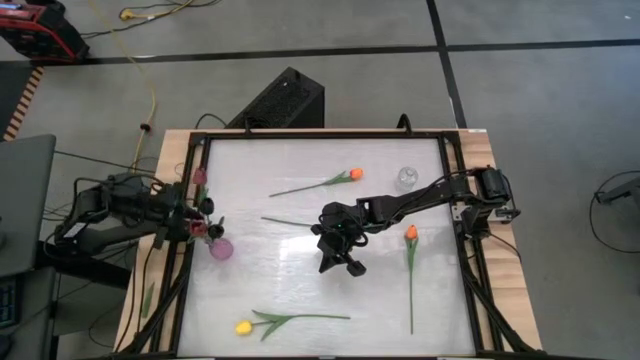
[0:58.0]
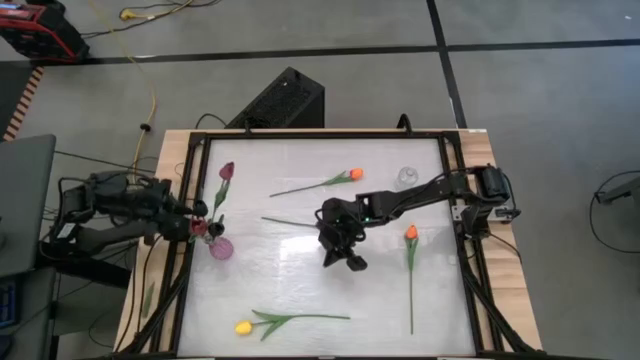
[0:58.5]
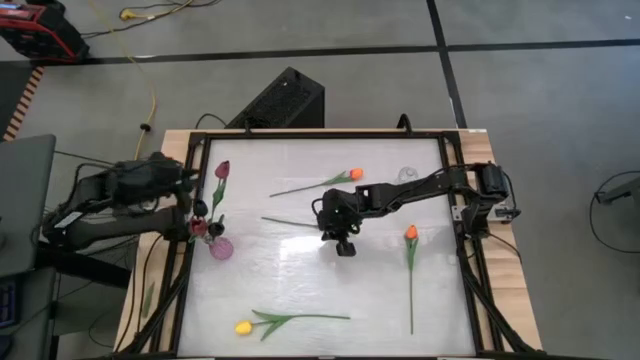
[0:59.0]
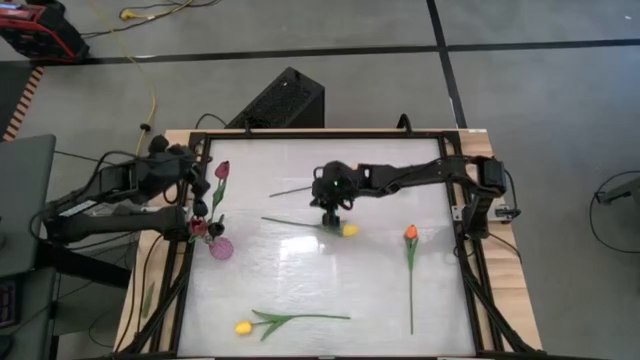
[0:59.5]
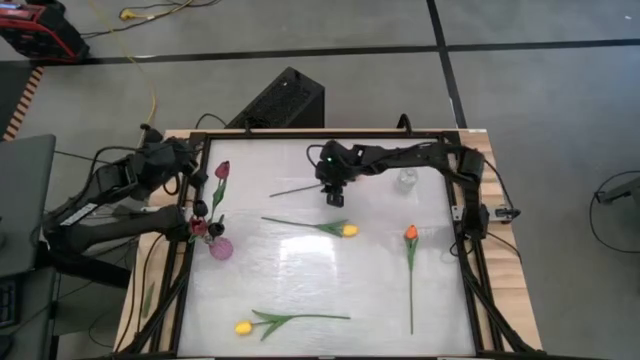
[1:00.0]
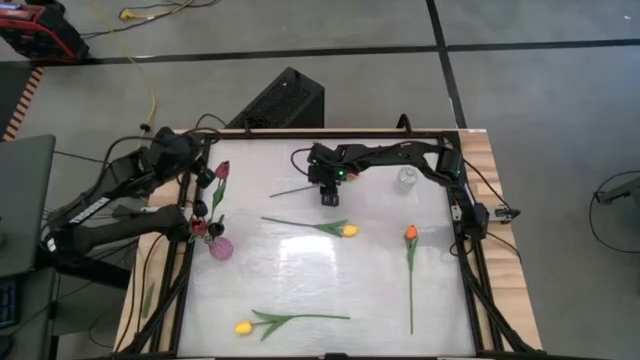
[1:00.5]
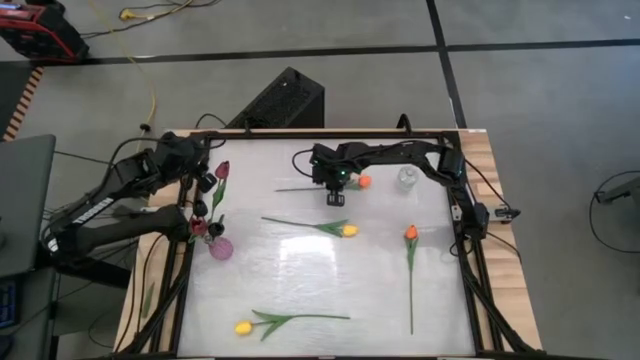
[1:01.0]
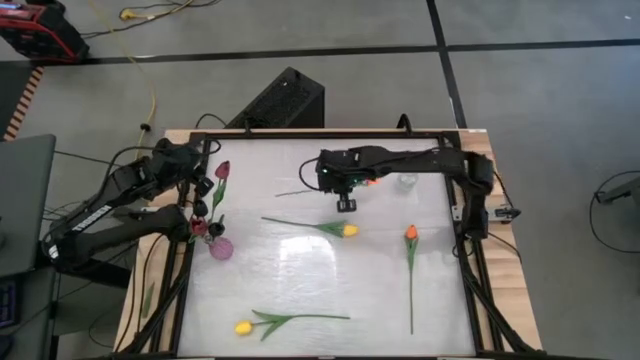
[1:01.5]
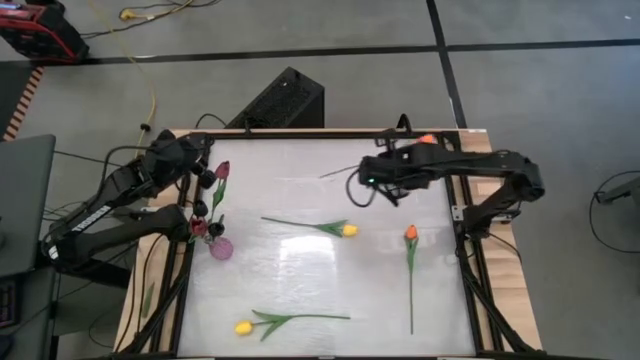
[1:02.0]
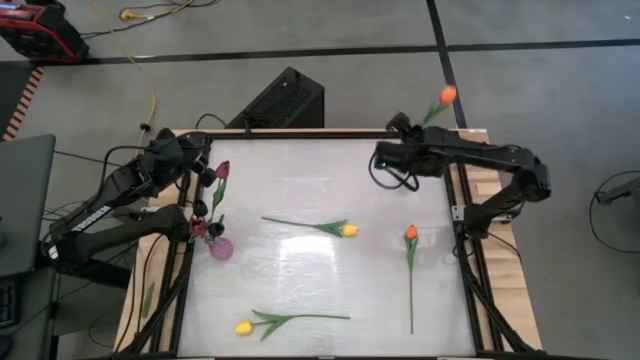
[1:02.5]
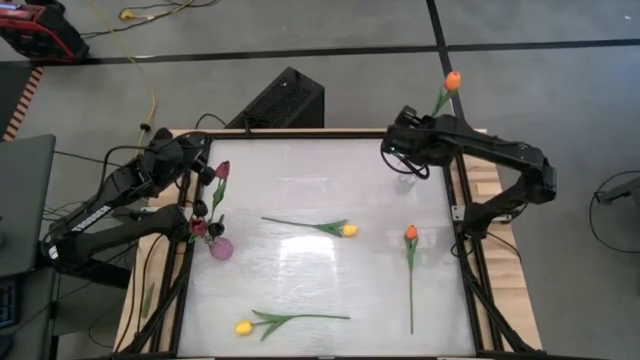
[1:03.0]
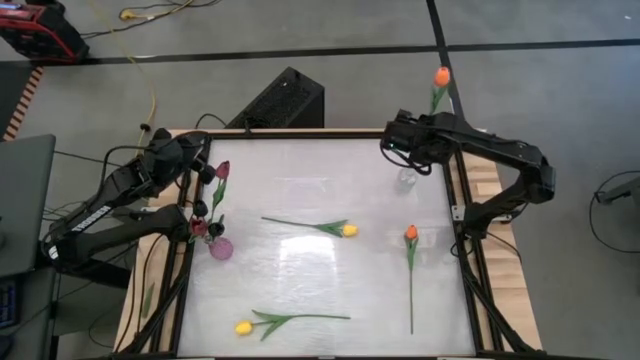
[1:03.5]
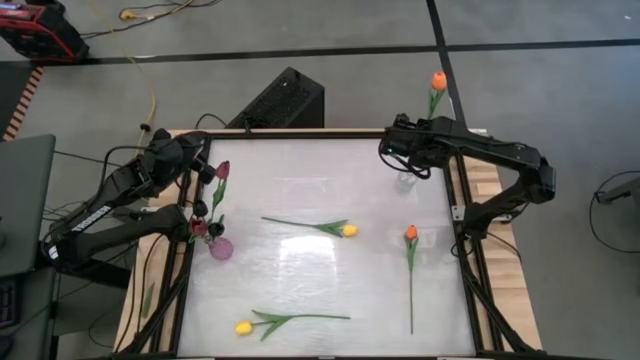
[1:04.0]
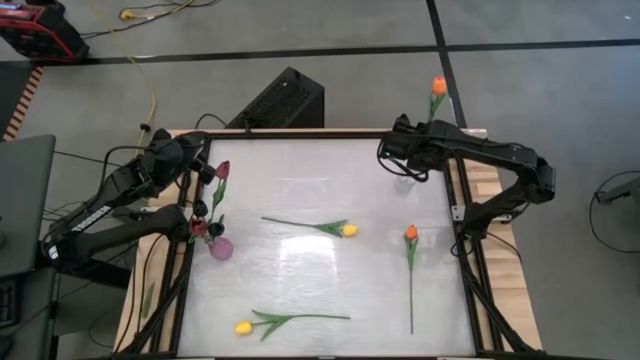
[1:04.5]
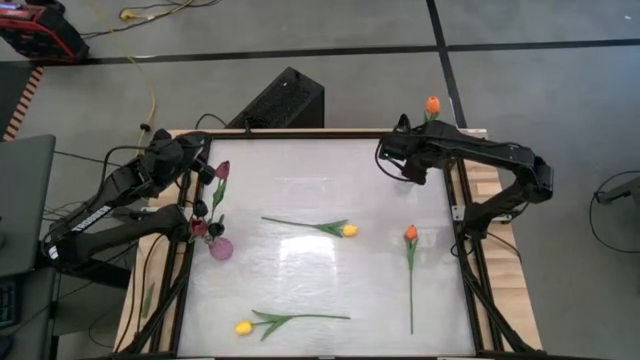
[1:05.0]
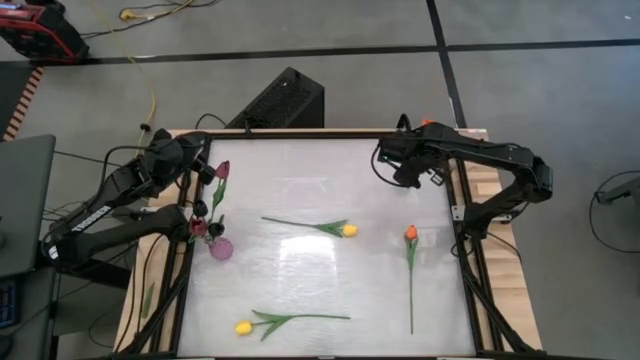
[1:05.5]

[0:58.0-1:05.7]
Task: Sort flowers into vase by color
Put the top orange tulip into the transparent vase

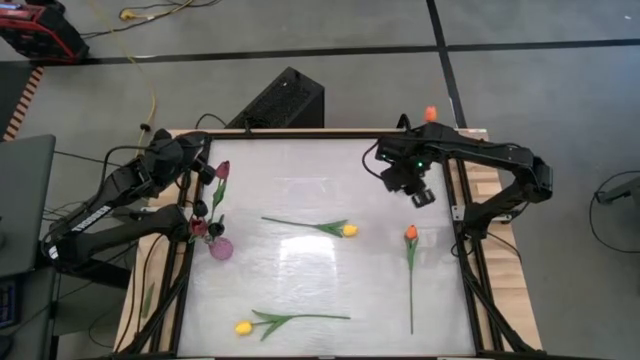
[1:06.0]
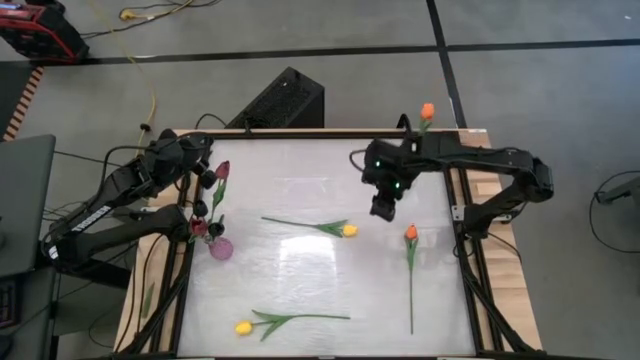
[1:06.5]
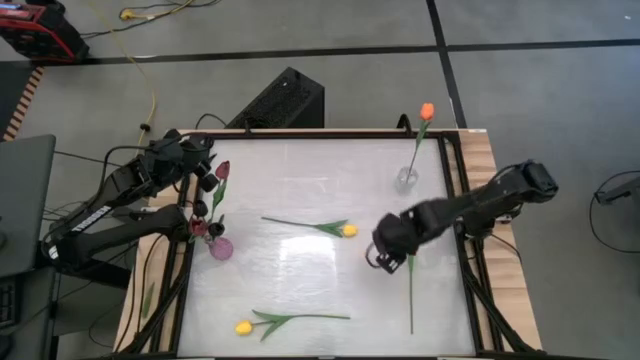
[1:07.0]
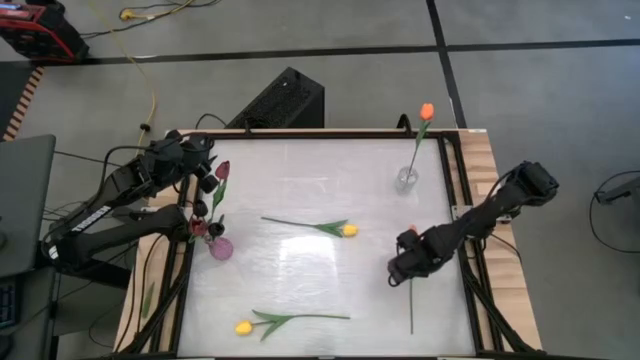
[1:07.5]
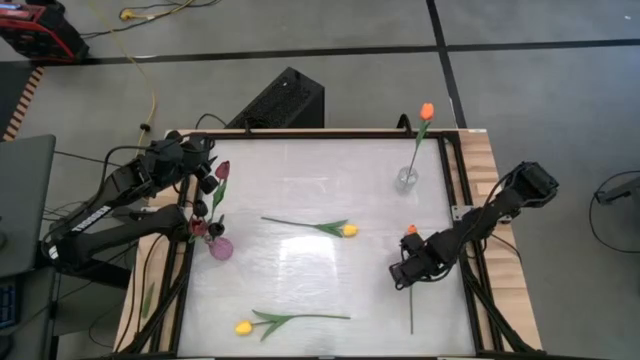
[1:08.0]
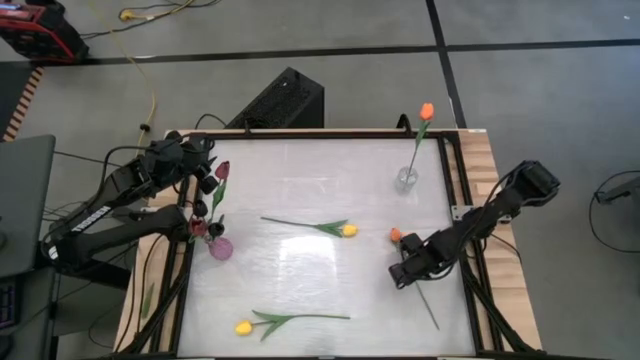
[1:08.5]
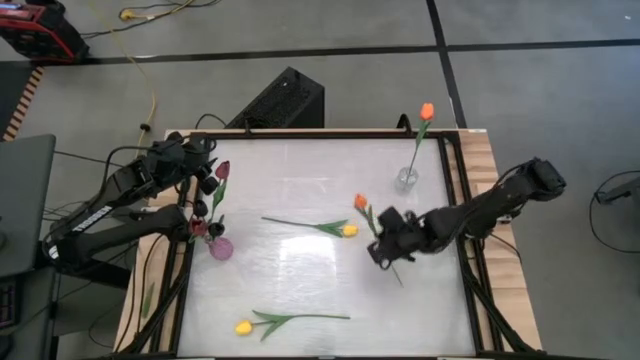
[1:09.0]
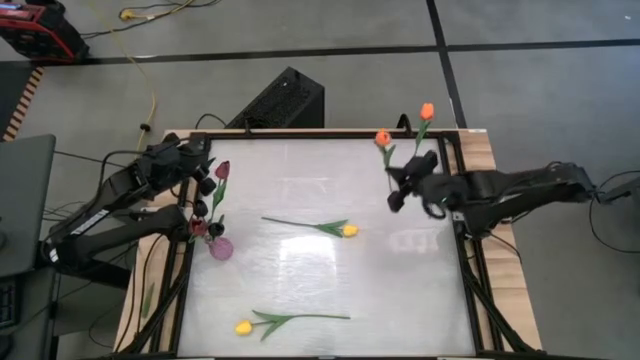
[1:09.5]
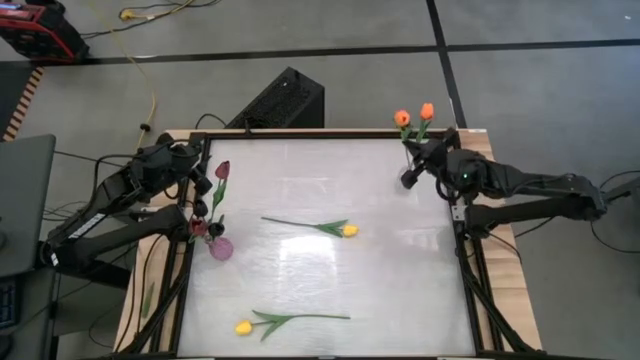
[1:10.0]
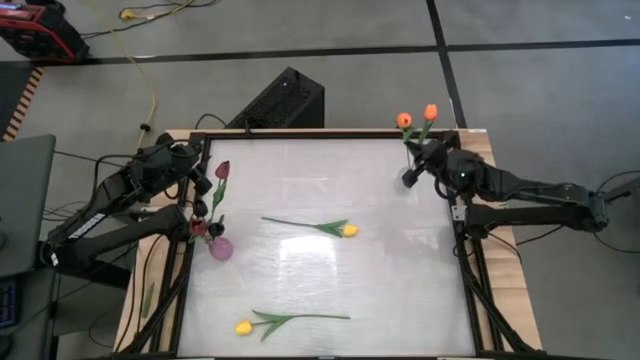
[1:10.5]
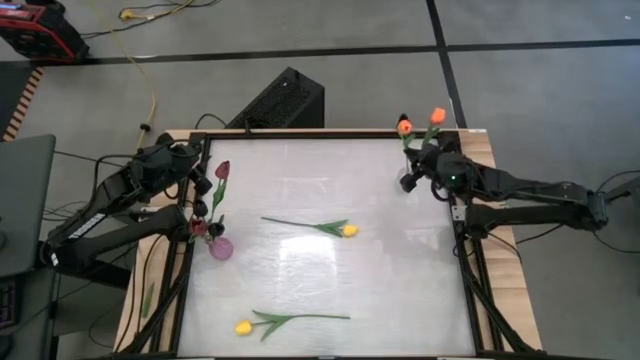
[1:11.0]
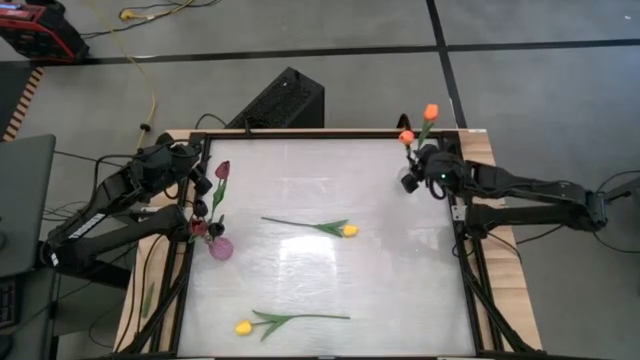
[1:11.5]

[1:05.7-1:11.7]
Put the orange tulip into the transparent vase

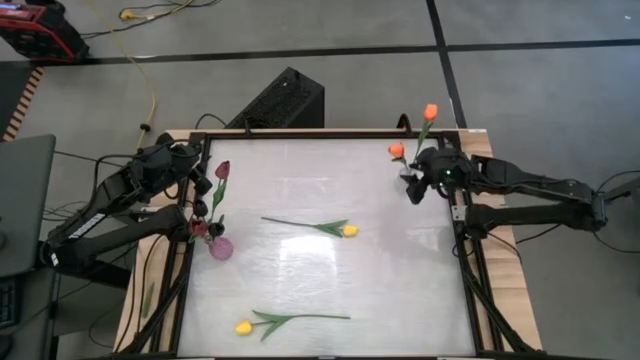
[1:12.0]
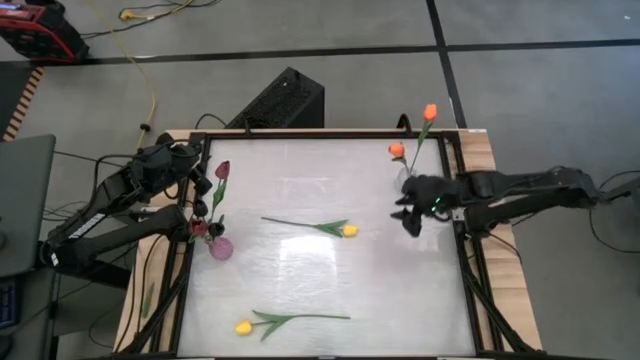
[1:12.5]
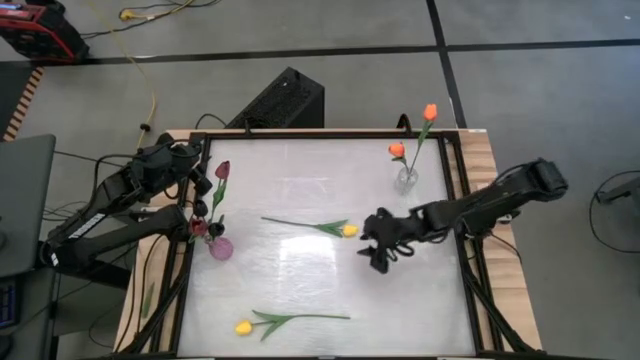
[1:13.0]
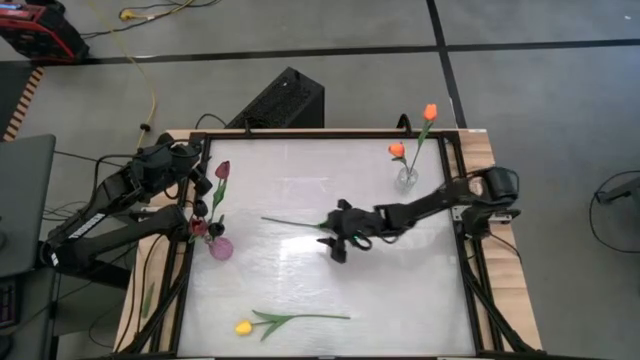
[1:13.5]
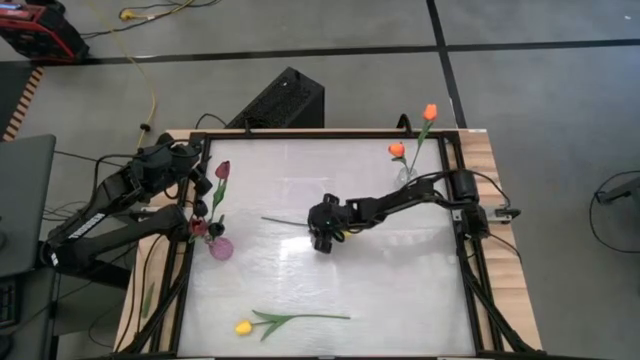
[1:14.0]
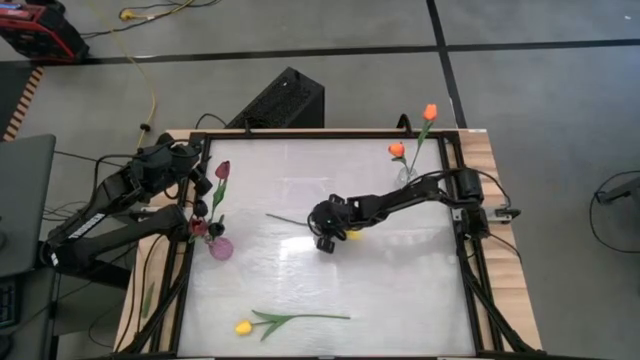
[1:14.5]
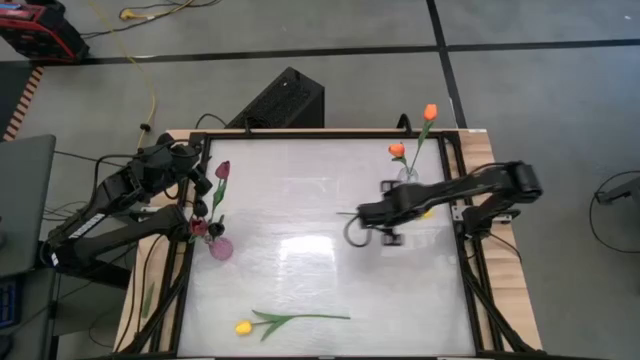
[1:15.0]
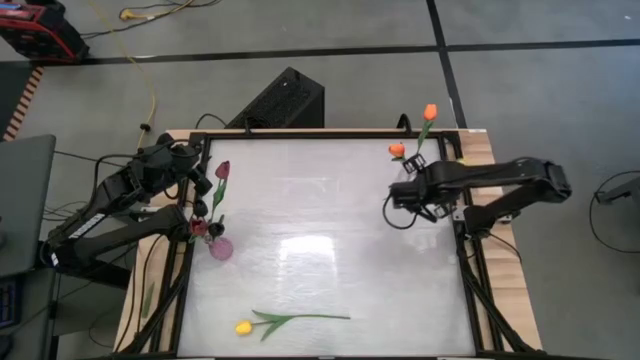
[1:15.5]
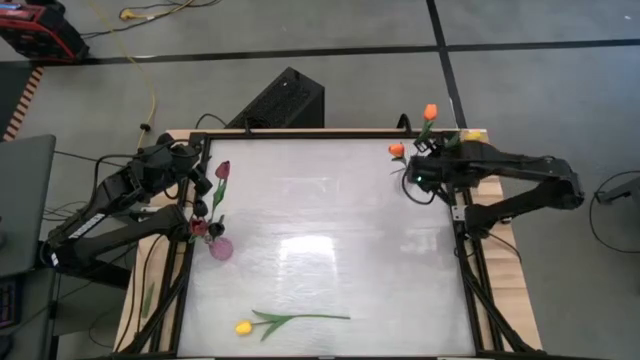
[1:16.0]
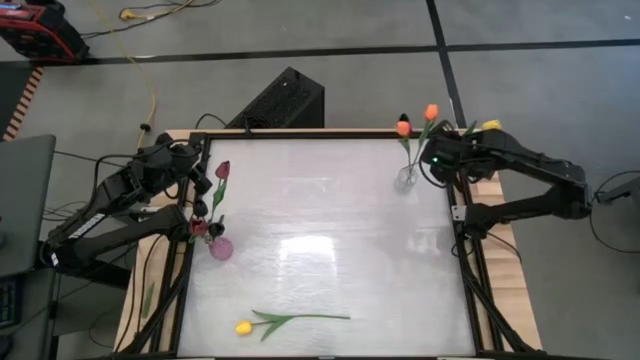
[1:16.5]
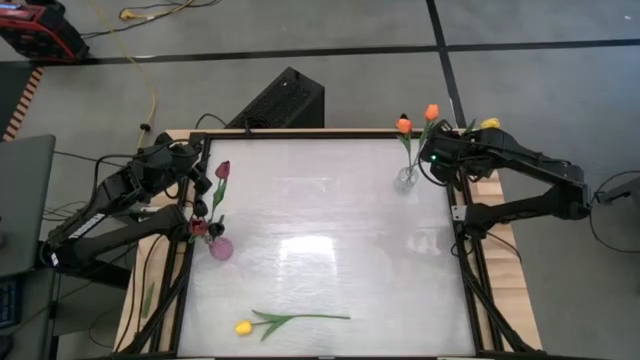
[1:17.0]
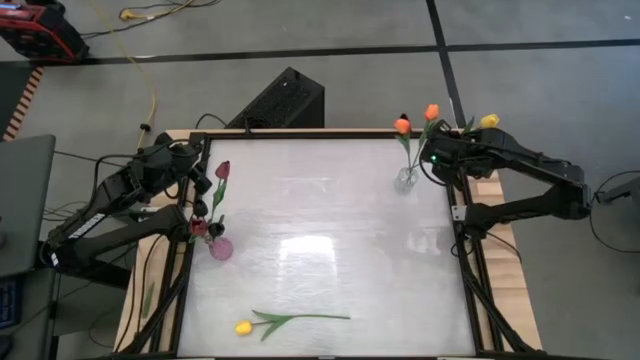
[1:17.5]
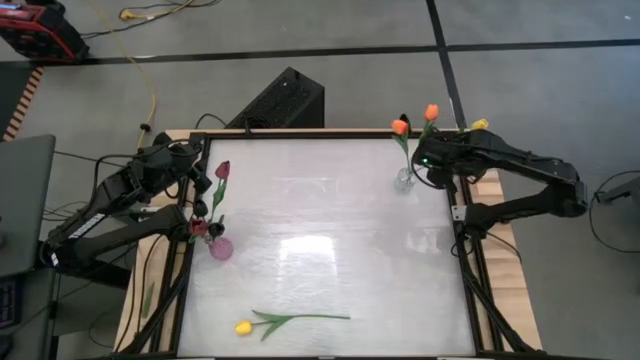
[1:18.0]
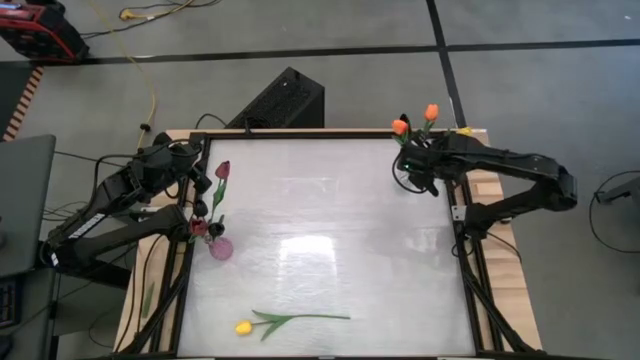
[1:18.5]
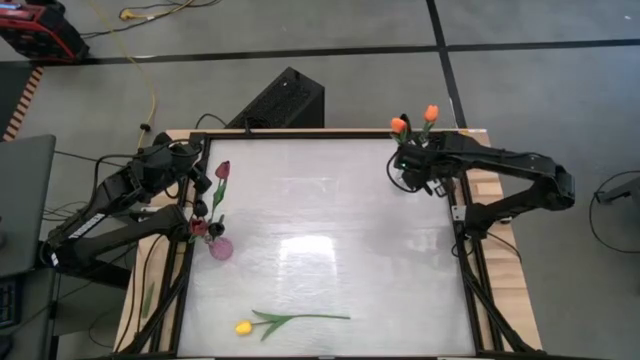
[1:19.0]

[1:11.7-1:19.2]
Put the top yellow tulip into the transparent vase
